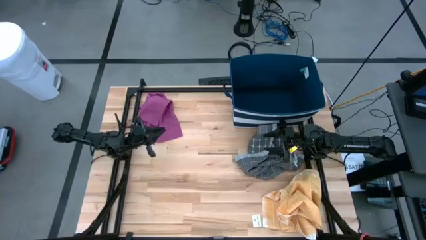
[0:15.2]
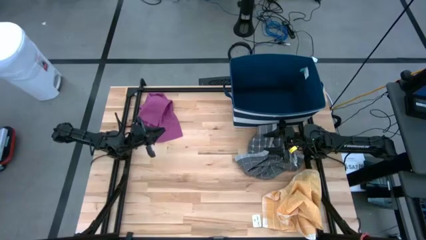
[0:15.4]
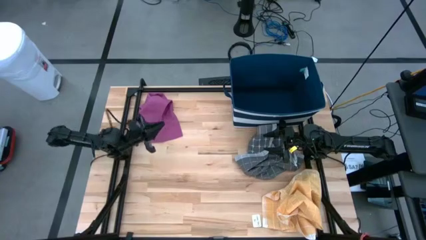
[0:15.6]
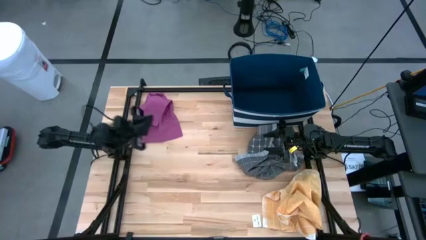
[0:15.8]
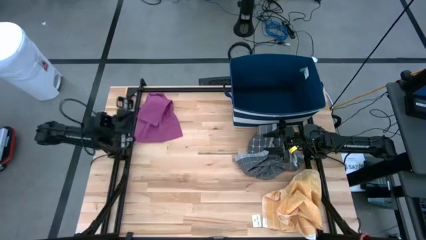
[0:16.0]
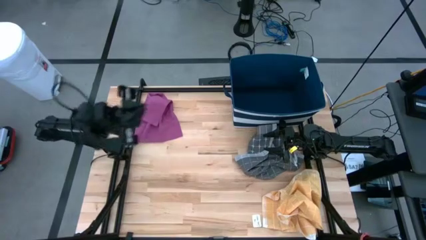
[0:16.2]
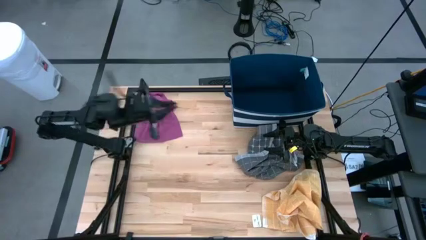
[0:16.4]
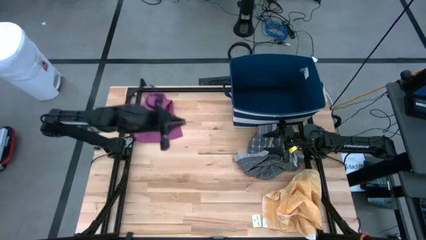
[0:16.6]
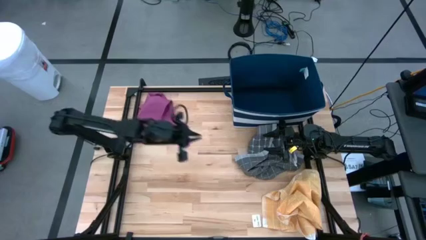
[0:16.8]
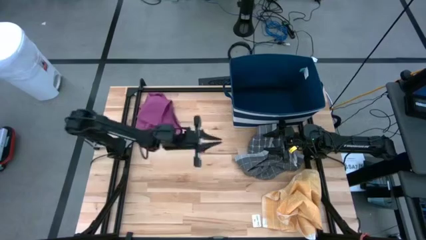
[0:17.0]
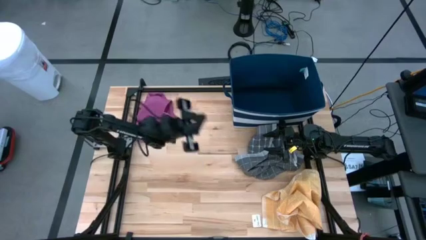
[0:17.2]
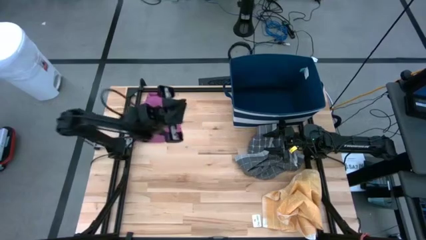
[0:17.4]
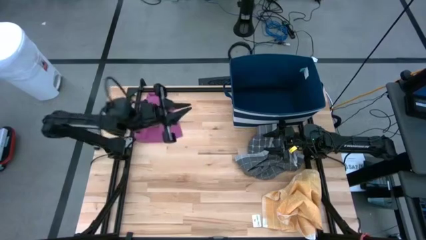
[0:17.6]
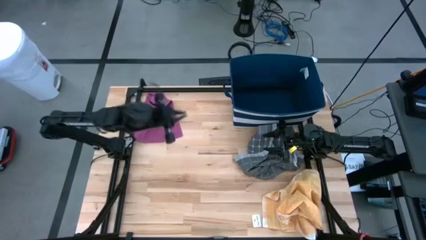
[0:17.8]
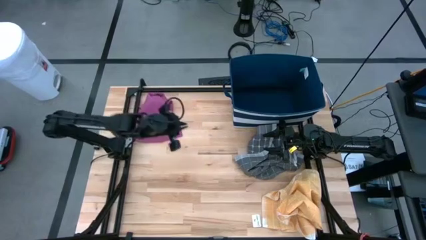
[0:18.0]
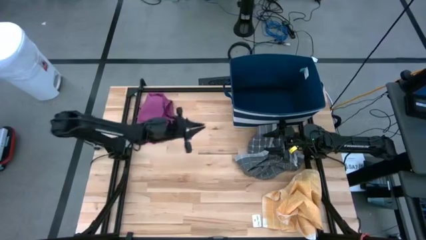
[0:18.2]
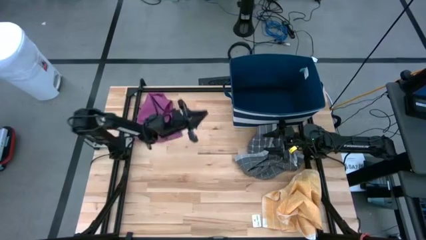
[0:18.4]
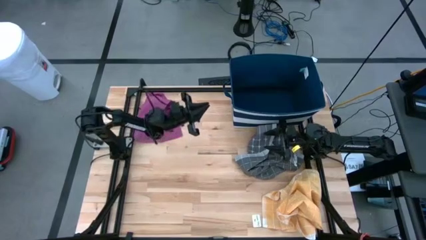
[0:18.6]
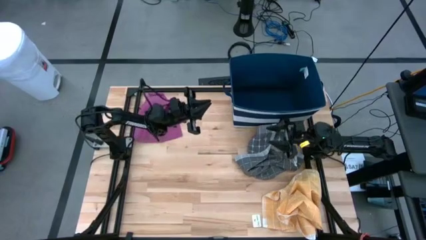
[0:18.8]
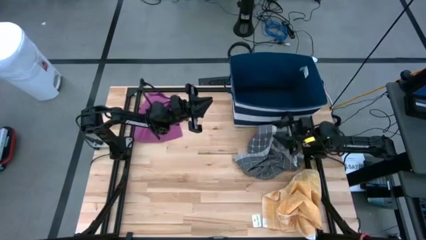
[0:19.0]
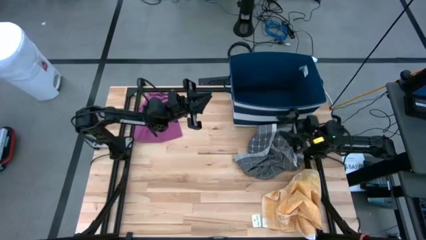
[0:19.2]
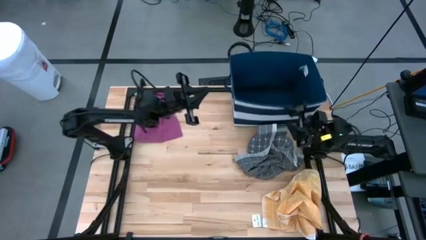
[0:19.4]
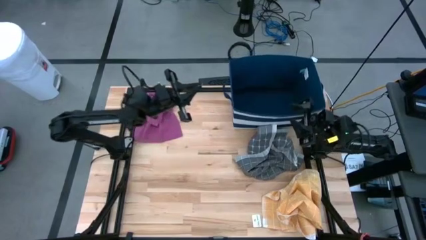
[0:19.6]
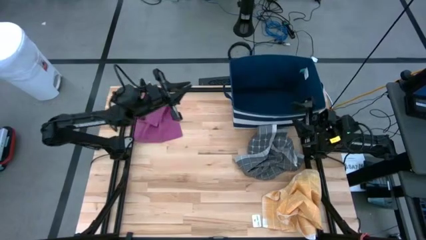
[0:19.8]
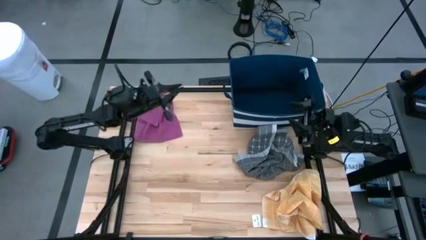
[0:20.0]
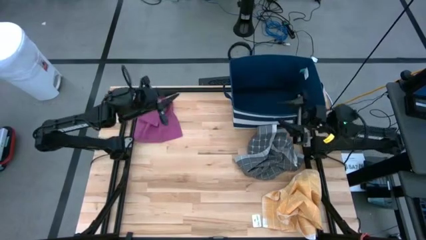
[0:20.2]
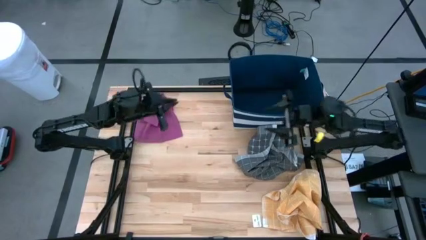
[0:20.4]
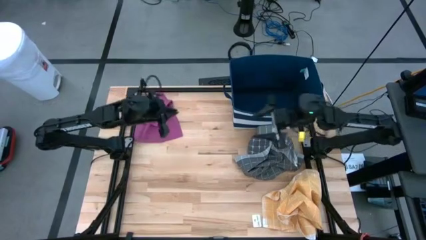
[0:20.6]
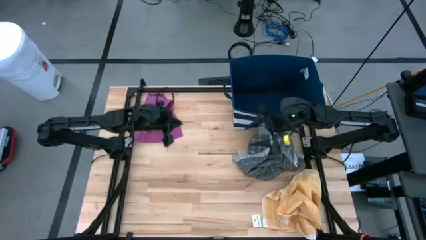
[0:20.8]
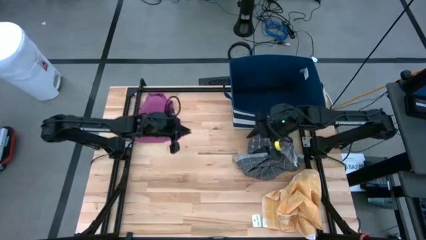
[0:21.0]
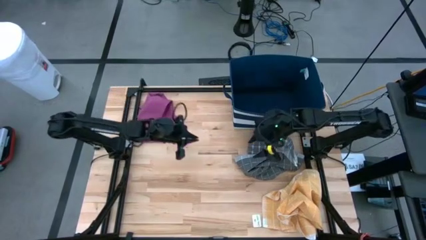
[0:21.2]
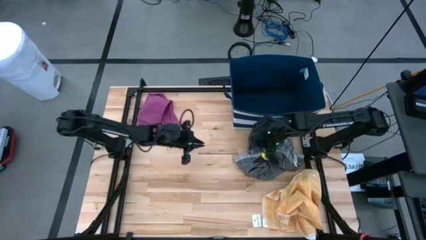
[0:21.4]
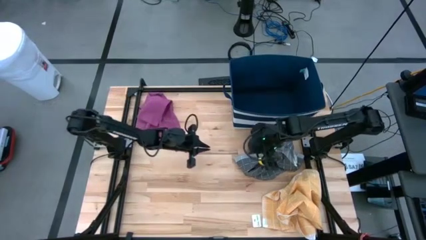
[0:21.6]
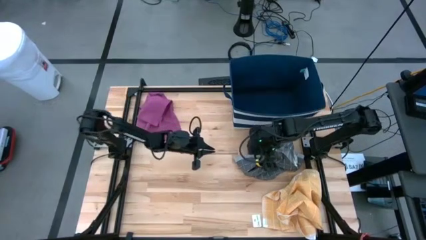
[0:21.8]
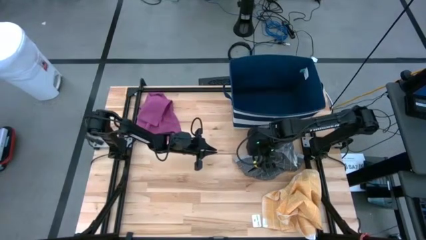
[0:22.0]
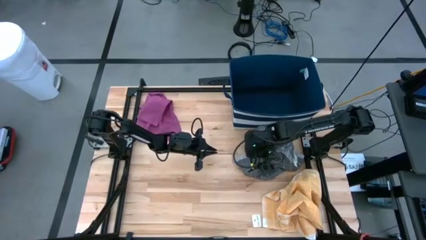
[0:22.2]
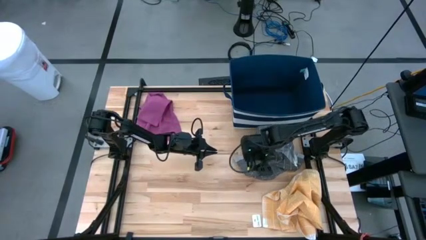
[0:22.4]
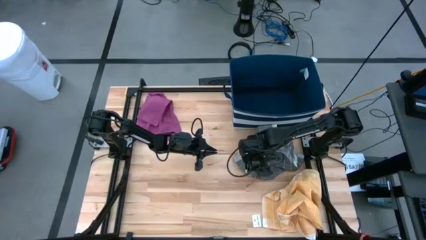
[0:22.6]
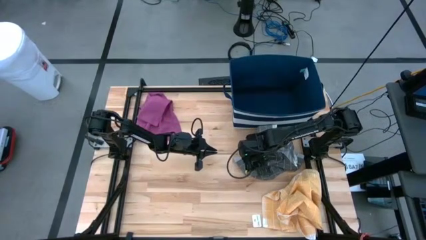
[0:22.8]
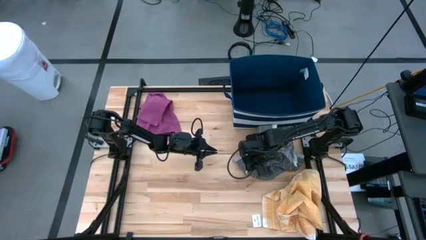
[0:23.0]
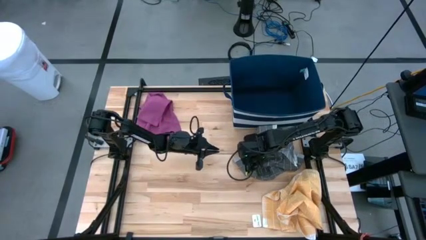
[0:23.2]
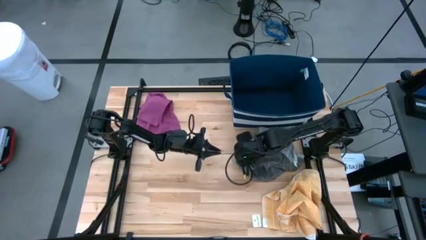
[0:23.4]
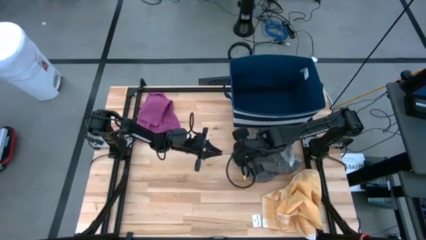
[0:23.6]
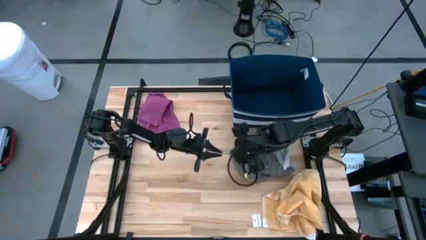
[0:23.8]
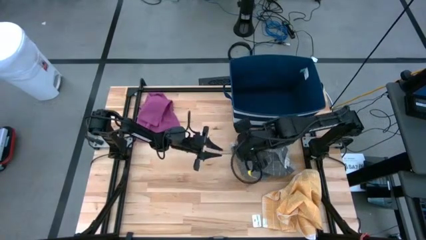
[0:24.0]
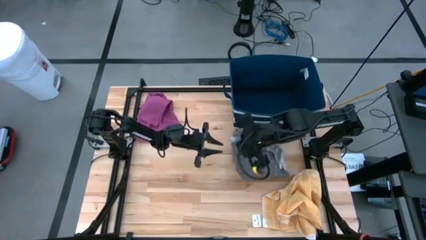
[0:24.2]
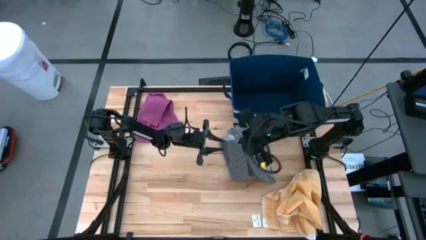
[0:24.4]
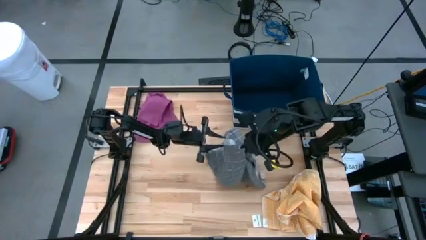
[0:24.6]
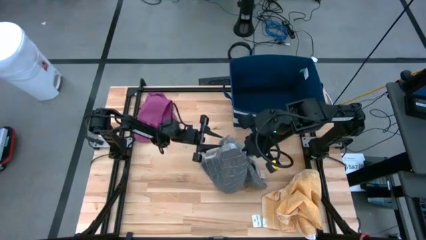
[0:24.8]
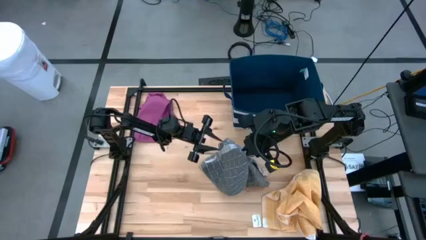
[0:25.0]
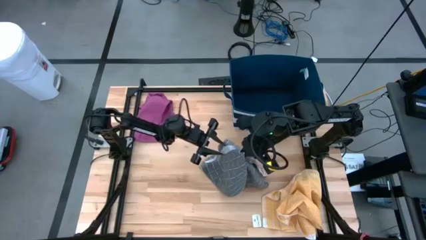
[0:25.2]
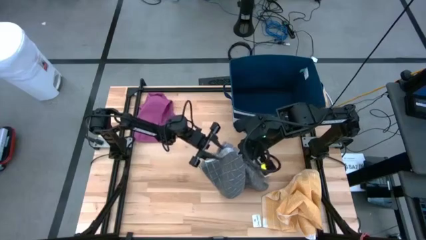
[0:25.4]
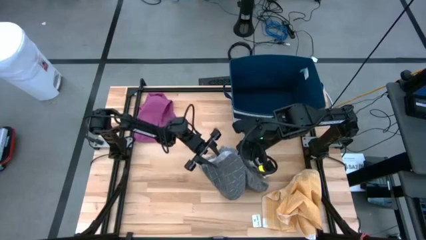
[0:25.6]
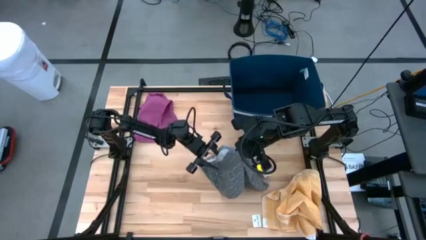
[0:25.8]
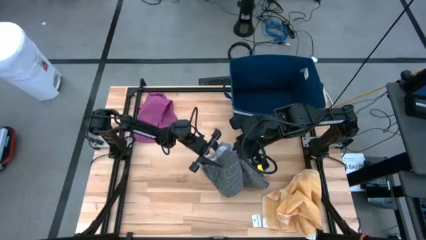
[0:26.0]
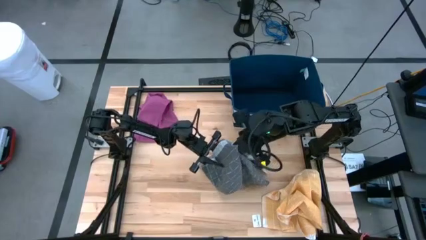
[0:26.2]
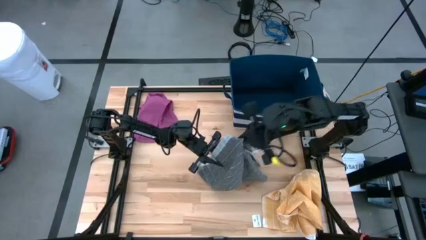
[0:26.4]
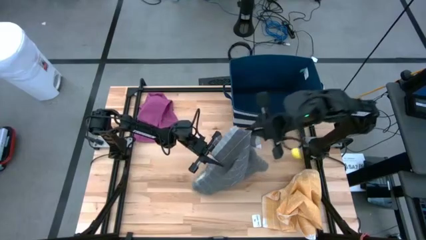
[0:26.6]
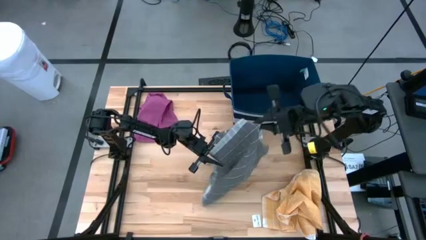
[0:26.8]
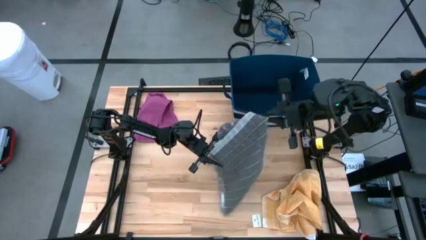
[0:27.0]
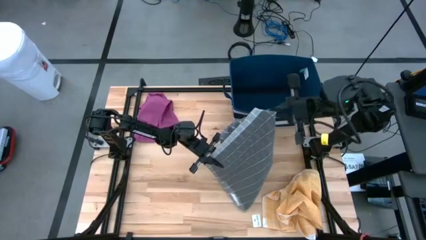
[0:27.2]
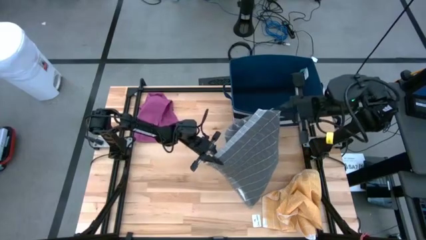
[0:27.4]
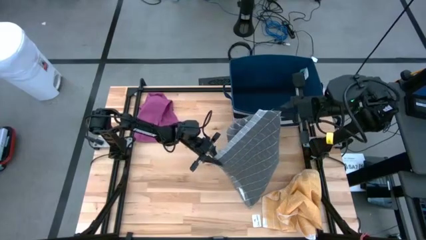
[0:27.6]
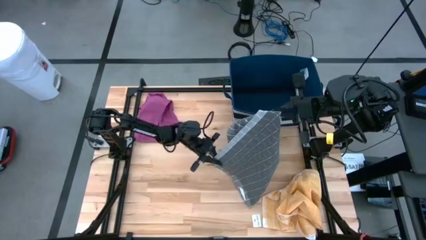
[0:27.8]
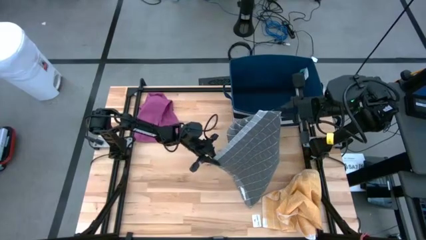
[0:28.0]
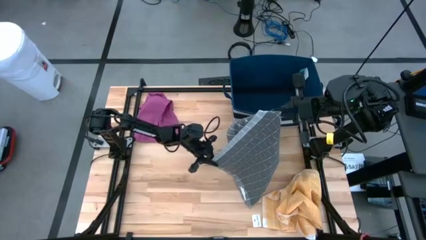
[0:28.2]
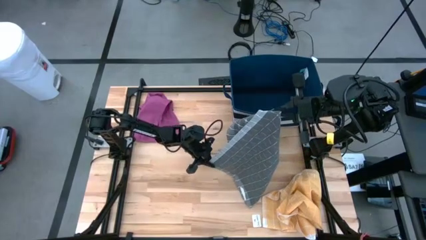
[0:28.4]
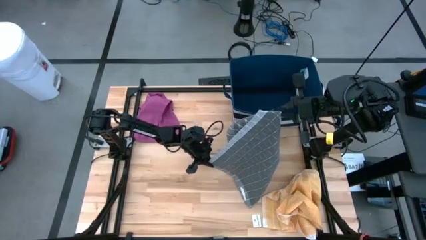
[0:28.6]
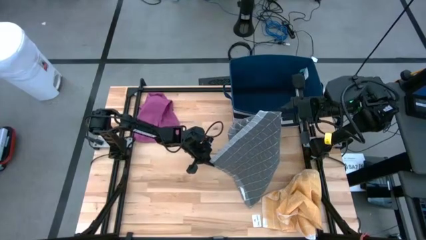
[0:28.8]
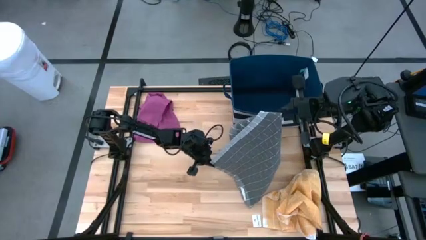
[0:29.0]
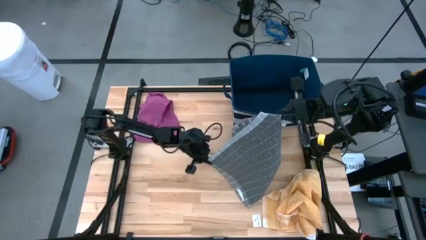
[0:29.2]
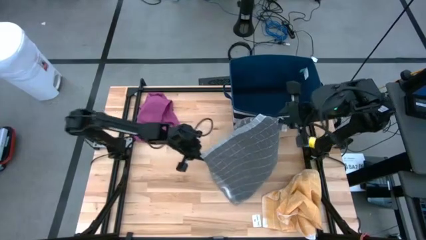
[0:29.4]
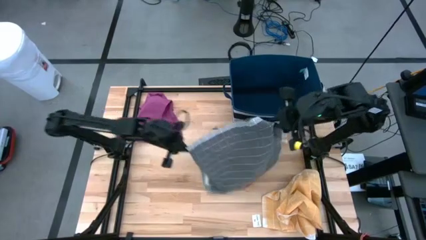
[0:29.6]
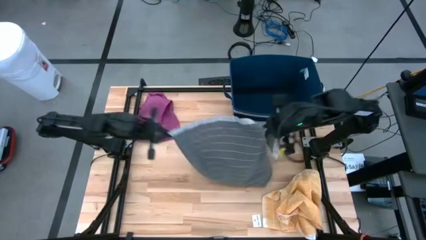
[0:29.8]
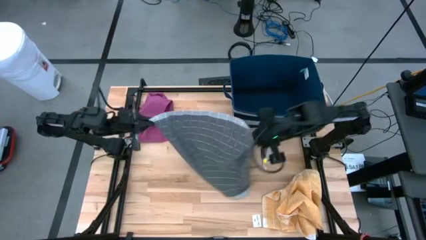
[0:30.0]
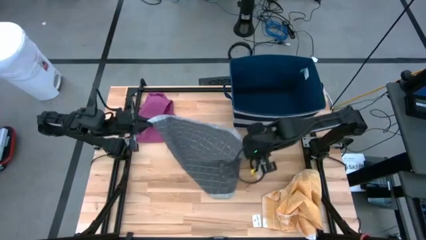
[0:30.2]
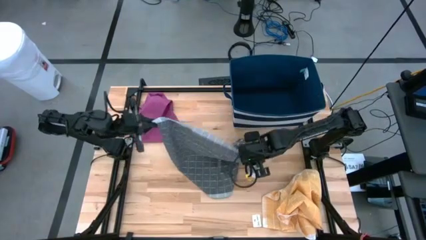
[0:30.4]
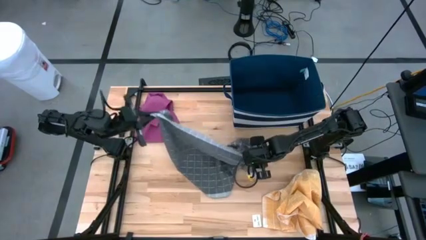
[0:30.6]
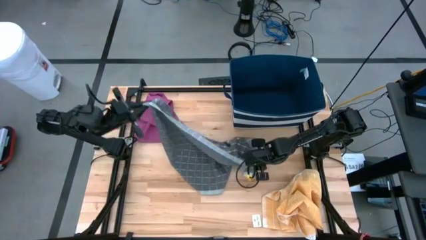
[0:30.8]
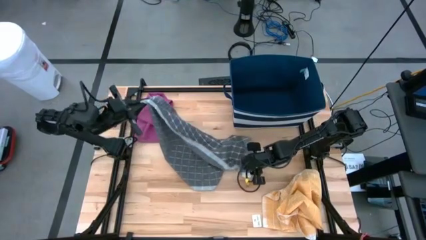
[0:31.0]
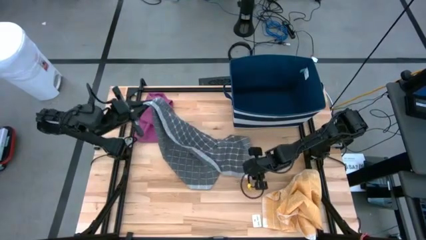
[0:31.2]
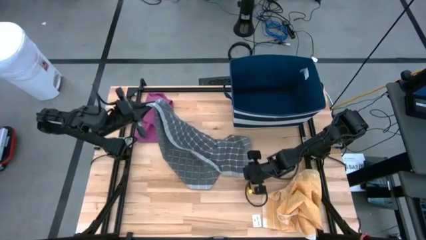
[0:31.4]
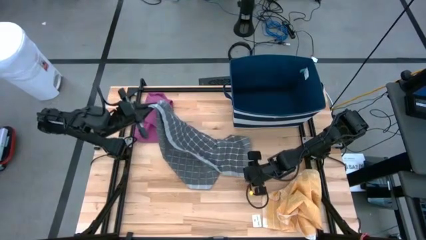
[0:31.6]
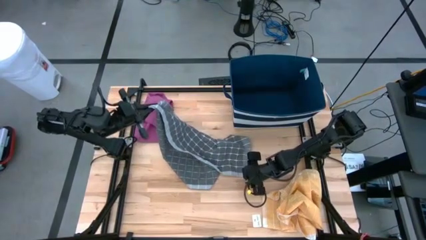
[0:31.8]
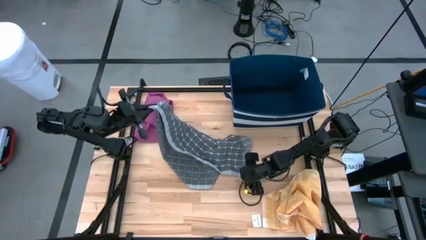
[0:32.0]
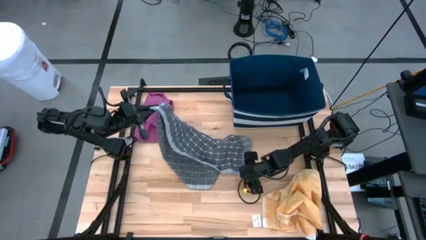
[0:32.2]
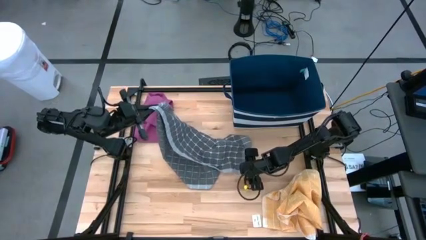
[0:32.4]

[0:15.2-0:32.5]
Task: Fold towel
Fold the gray checkered towel
